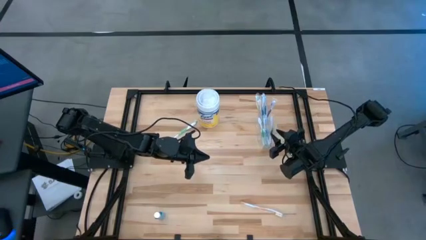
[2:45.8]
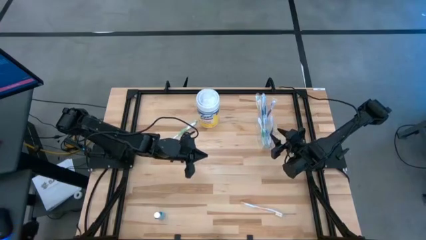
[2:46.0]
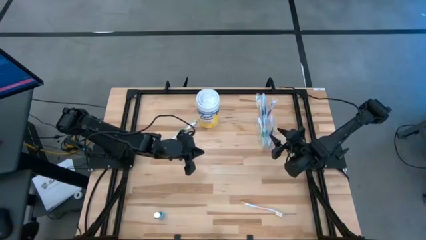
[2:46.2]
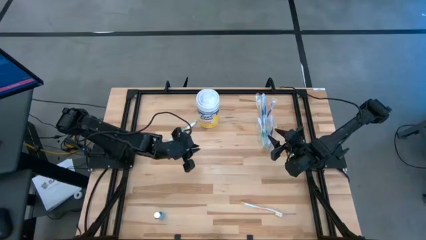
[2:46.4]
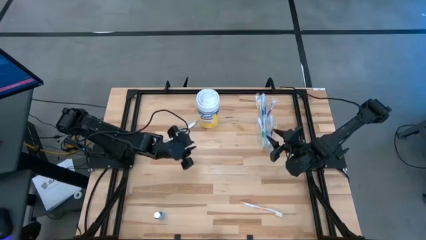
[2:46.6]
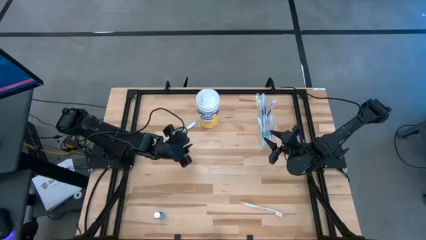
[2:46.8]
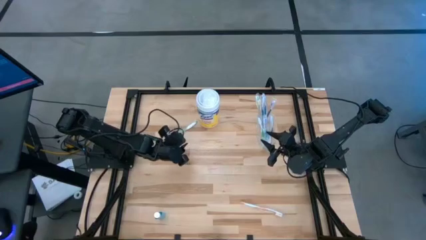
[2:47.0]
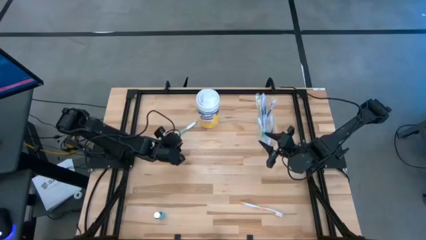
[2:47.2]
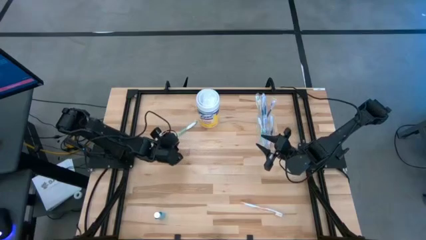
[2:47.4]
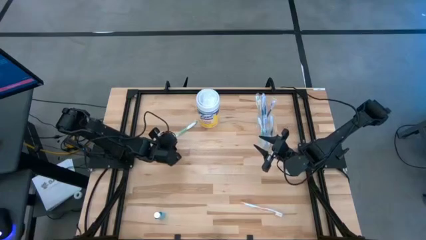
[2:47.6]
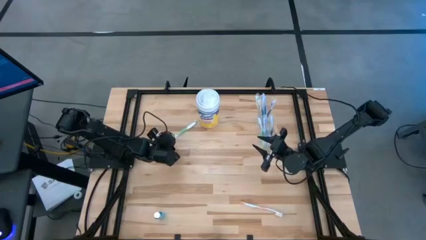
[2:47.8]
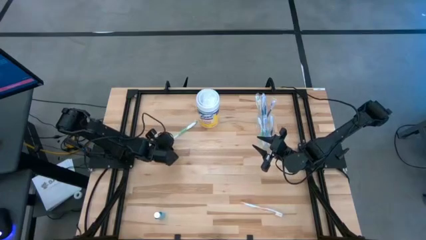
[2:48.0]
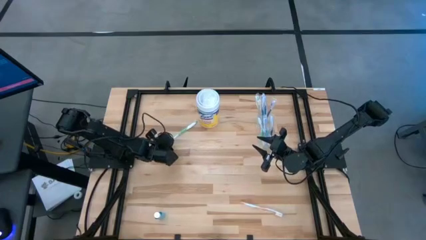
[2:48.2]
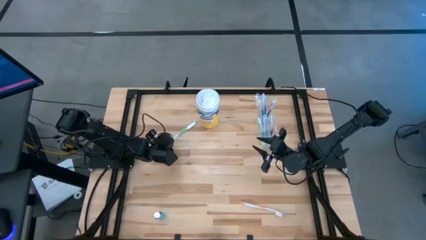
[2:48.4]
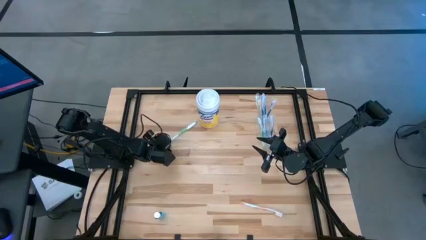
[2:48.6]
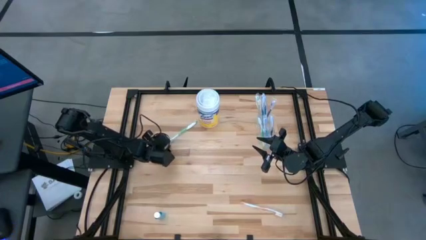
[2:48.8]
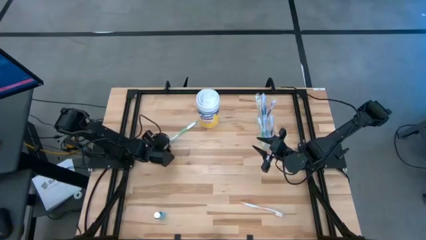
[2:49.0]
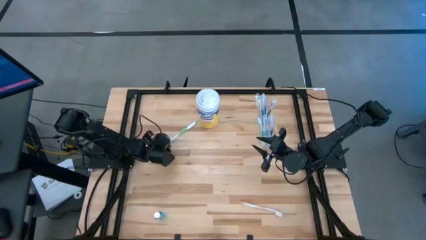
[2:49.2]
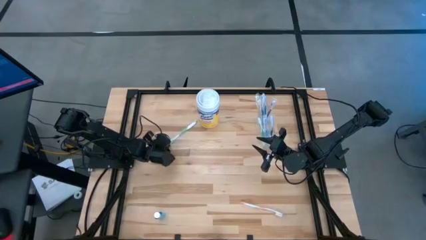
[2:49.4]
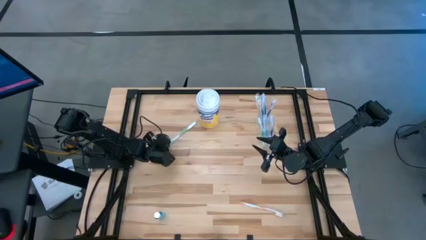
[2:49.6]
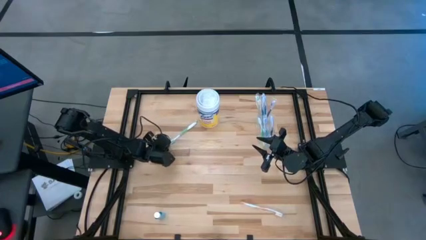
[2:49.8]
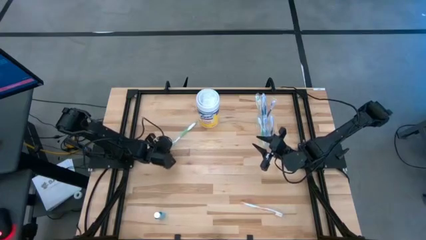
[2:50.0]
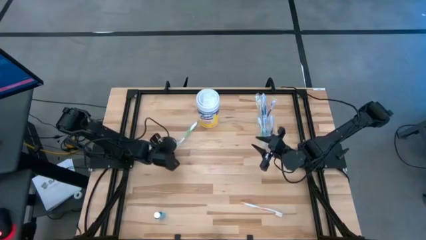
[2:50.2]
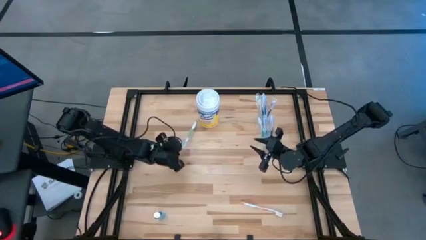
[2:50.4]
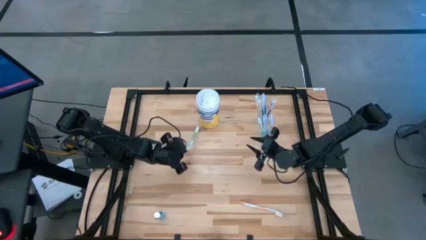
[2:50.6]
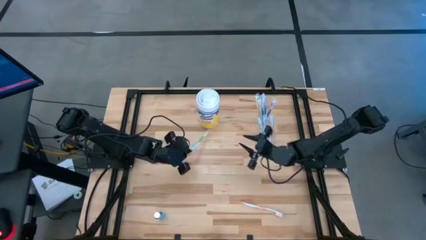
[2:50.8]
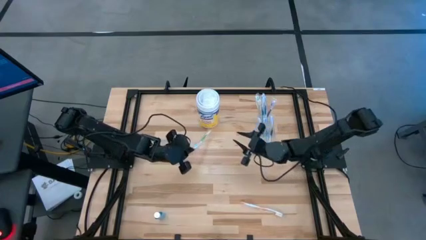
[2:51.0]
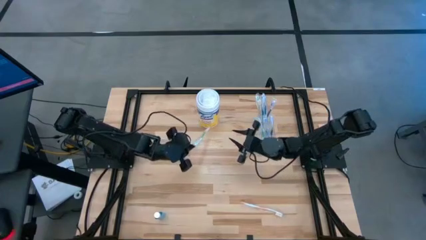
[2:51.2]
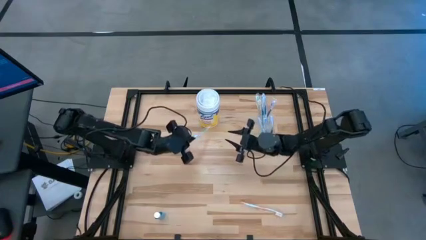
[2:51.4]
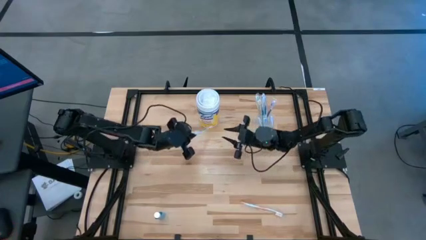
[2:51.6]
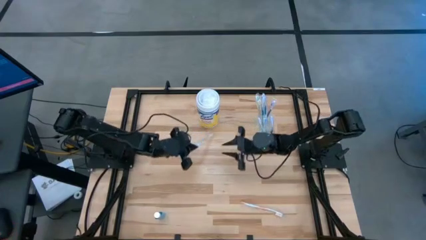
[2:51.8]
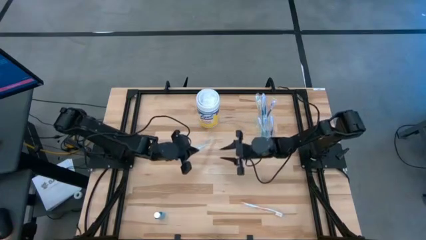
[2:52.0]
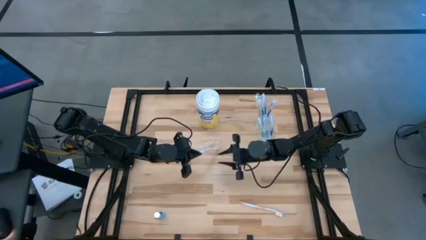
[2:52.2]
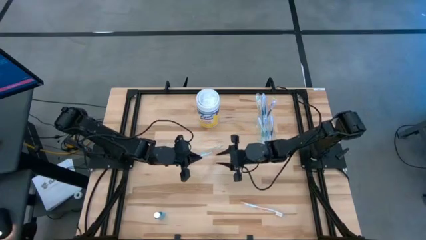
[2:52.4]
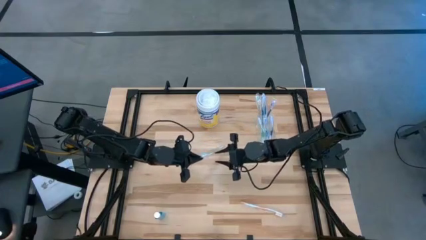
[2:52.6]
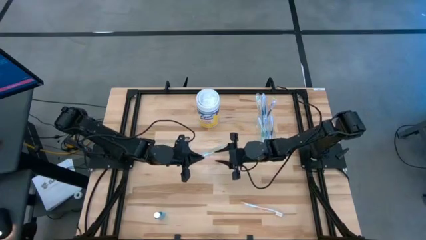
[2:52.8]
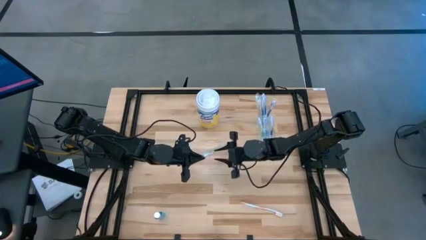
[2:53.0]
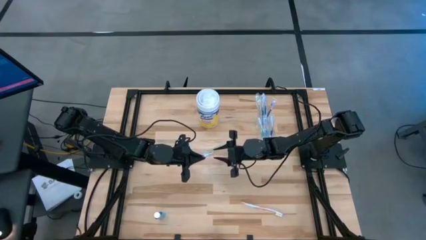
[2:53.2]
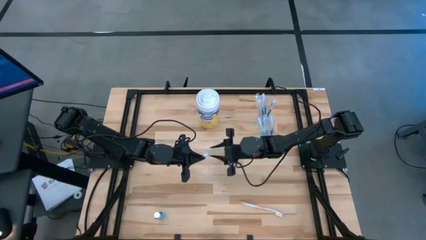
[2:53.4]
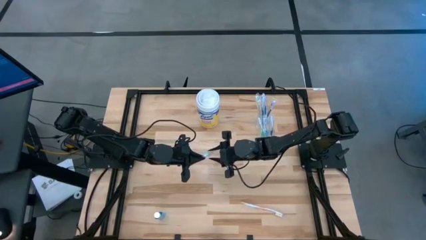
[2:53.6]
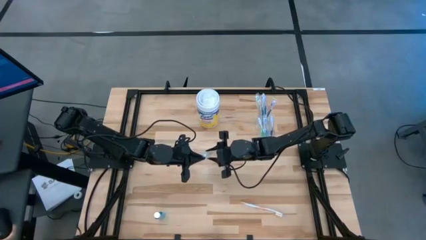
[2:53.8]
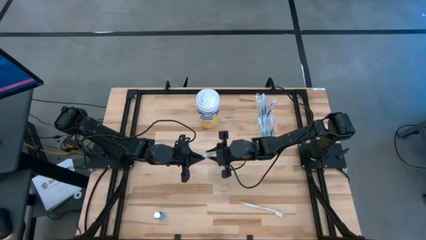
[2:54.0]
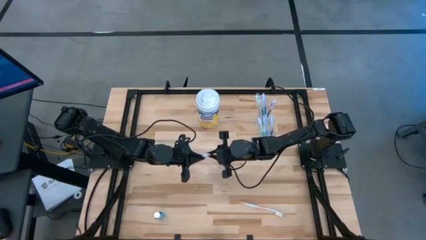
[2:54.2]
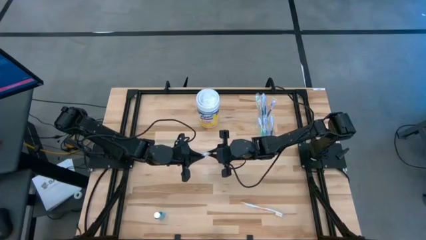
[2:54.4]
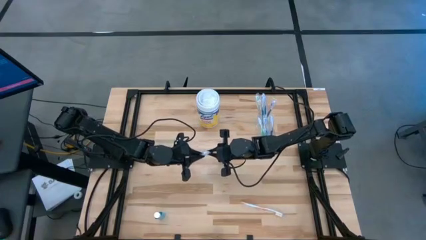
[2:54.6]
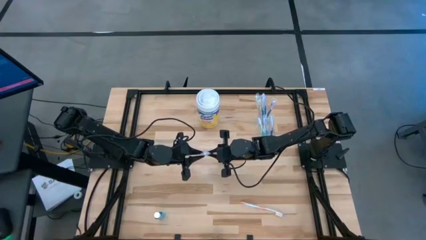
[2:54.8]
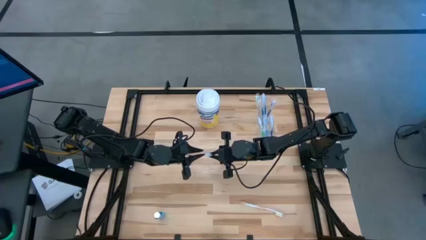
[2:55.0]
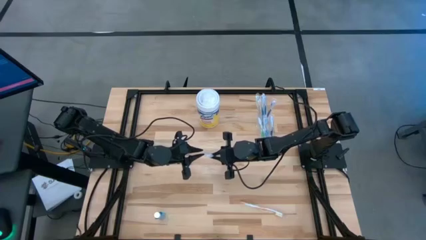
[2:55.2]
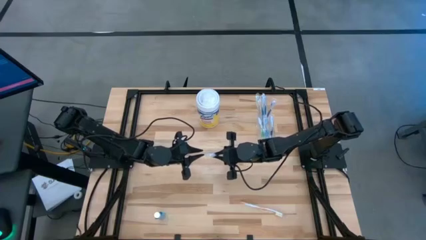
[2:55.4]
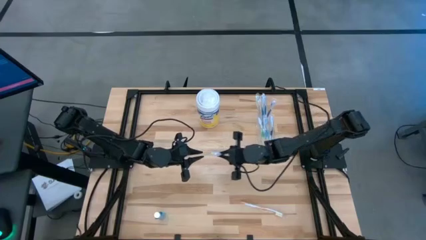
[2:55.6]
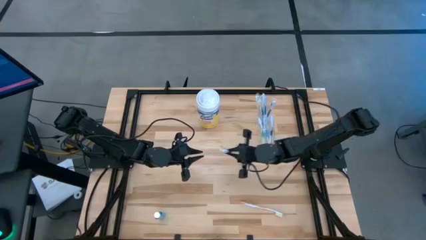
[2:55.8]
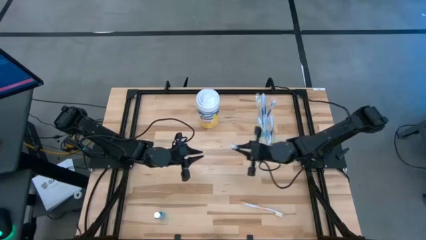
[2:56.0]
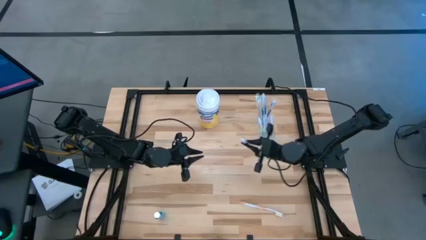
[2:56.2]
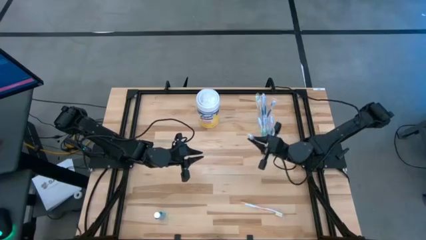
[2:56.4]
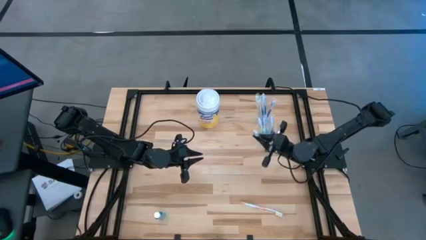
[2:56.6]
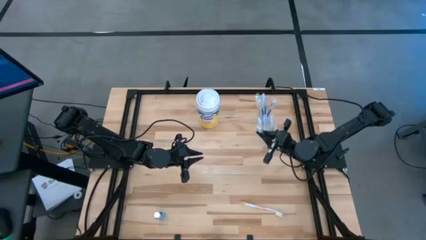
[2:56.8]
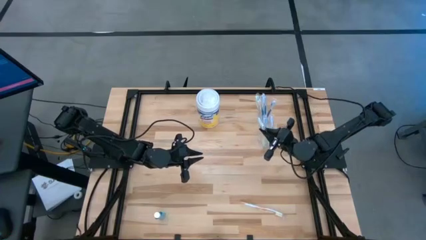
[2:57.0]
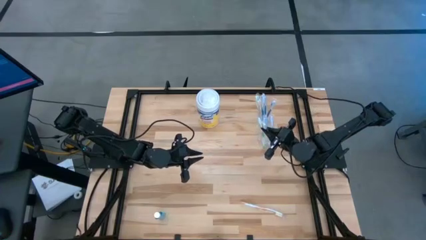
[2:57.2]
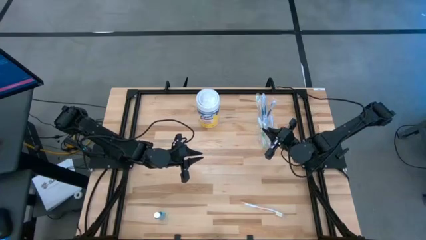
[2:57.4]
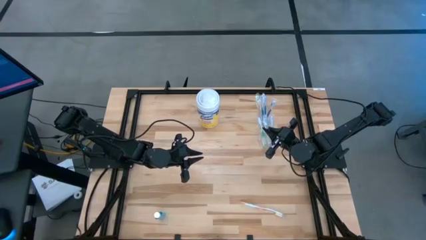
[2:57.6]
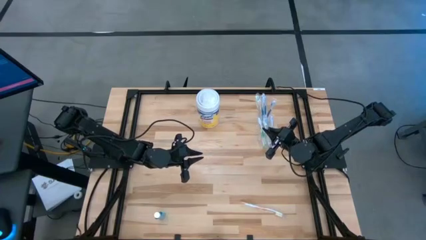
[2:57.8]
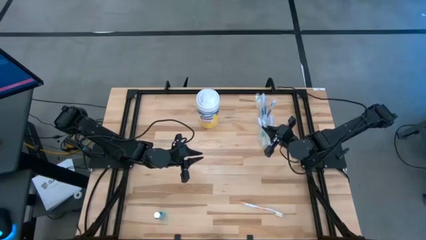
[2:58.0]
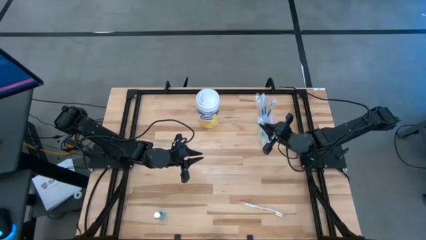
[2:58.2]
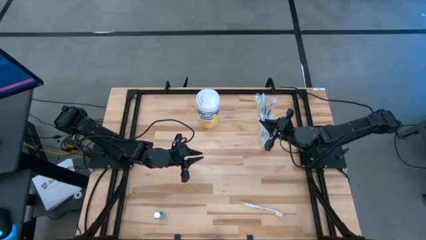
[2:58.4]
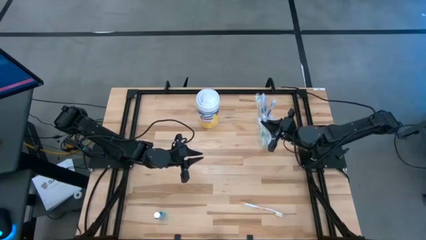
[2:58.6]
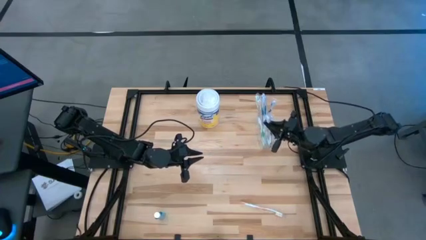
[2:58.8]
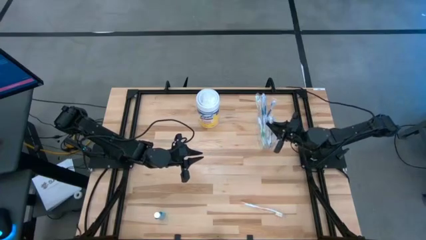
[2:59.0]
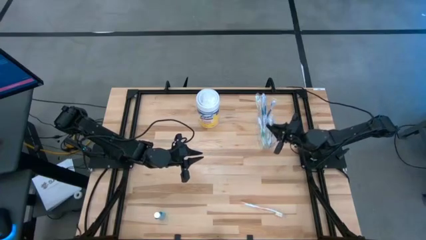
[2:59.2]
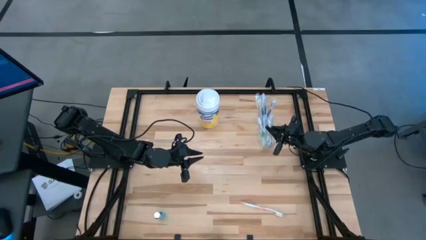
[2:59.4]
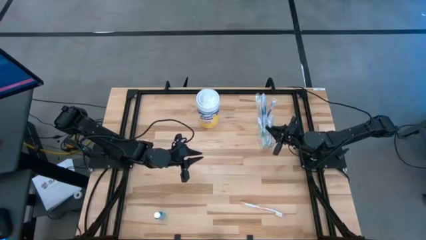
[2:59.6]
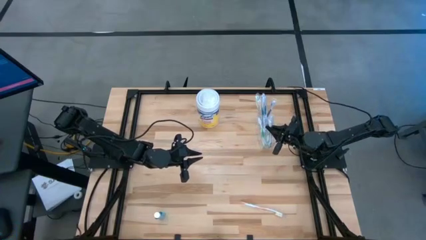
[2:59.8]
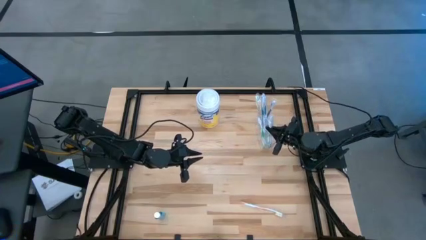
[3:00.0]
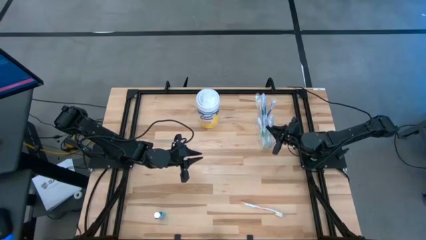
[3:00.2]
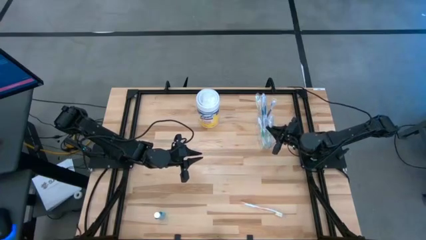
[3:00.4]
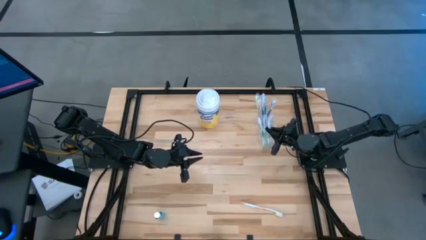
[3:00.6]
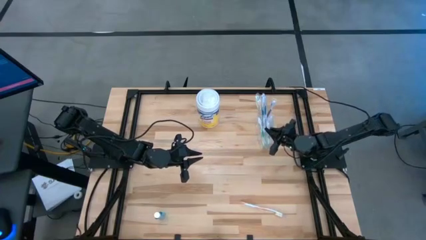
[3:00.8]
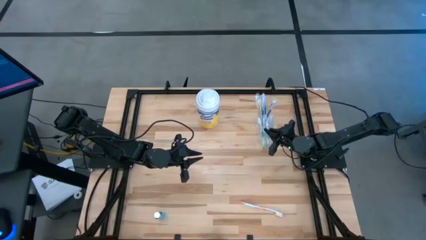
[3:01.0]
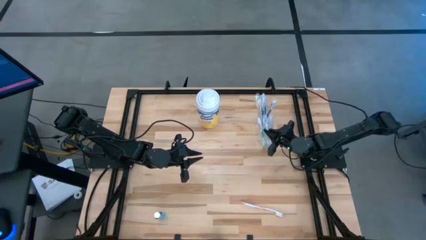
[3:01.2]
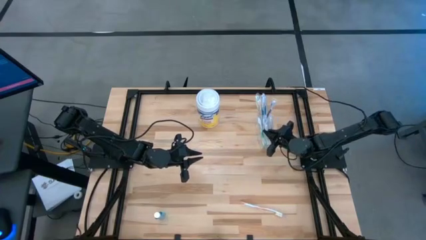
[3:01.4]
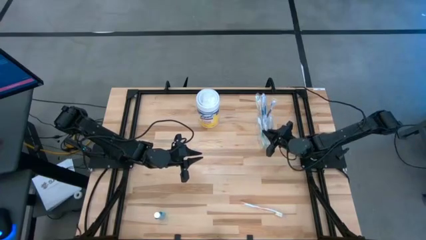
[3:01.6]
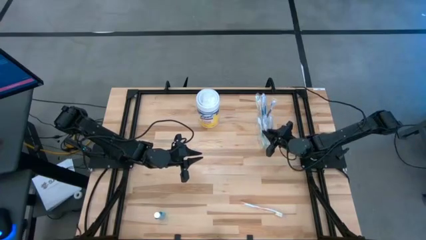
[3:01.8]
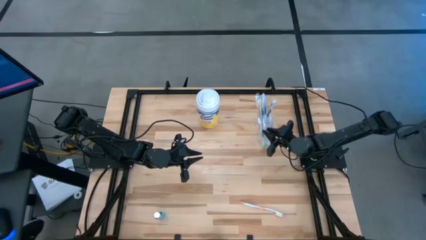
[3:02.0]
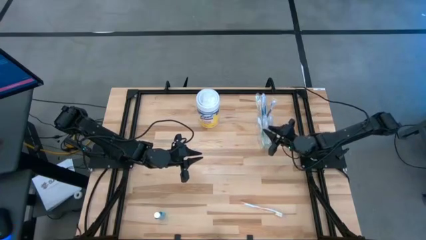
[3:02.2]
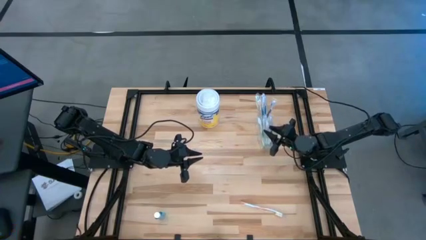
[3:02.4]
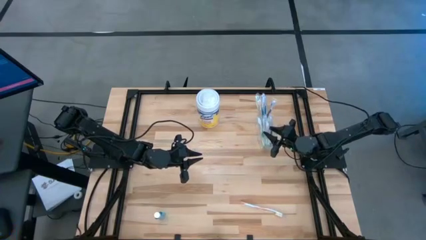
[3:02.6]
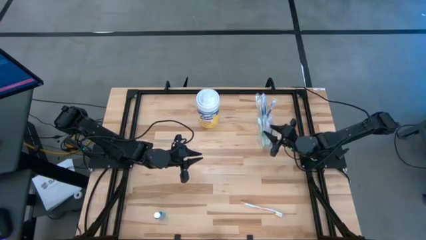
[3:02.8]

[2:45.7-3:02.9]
Task: Pick & Place toothbrushing station
Put the green toothbrush into the transparent organizer

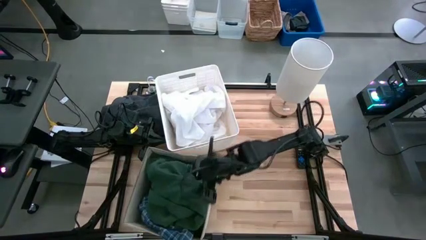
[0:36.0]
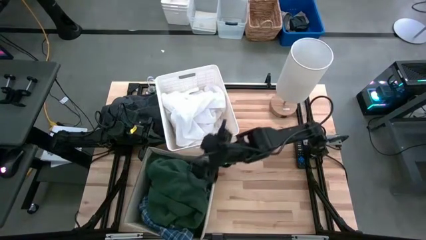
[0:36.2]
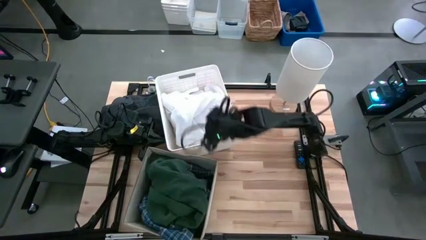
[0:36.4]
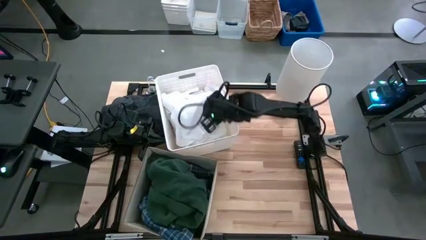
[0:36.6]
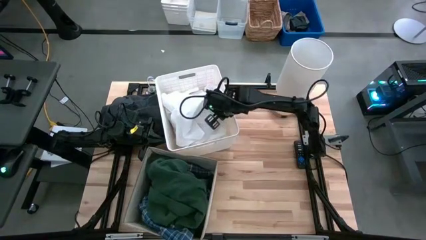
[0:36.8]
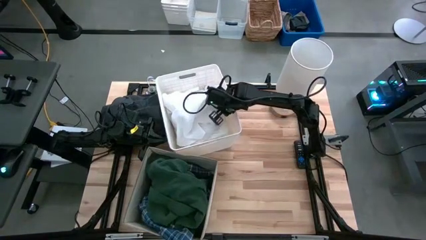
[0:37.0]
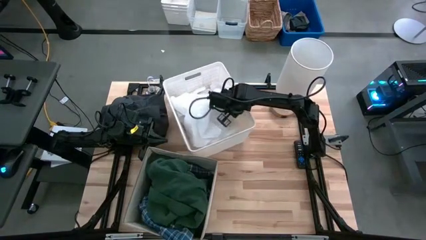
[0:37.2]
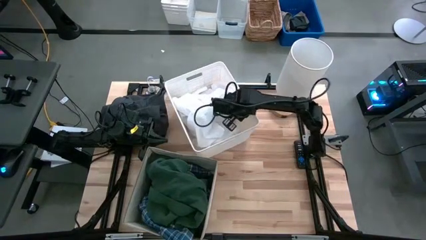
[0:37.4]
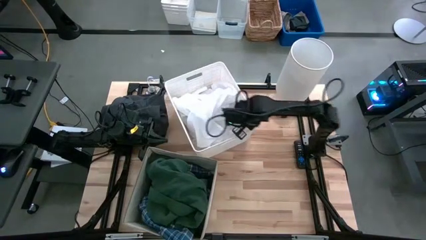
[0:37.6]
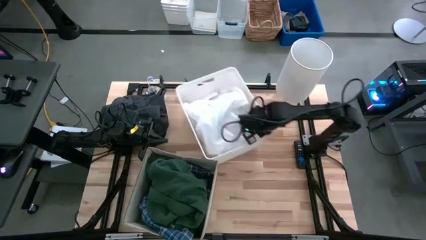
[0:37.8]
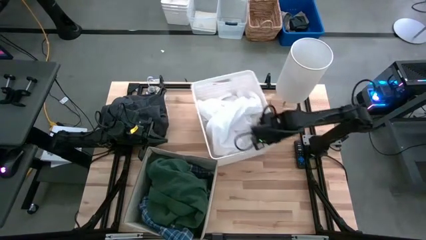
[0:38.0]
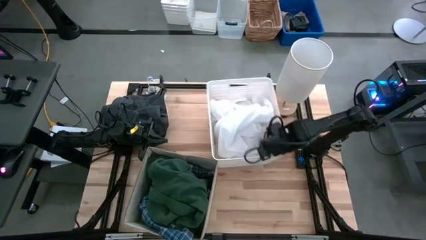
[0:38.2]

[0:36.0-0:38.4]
Task: Sort clothes
Move the white bin to the right of the table
